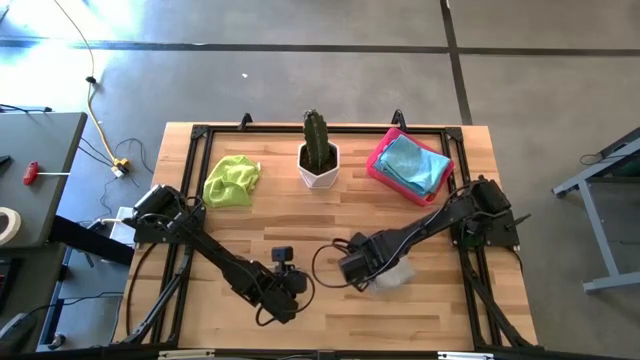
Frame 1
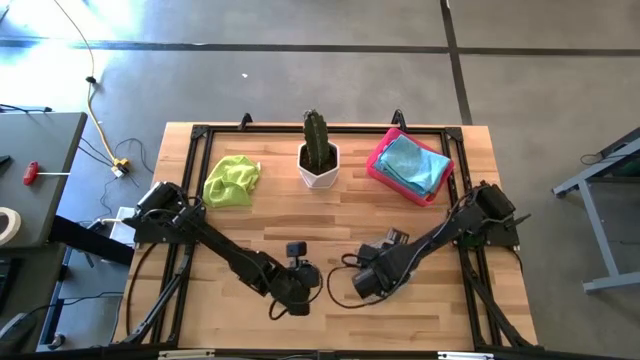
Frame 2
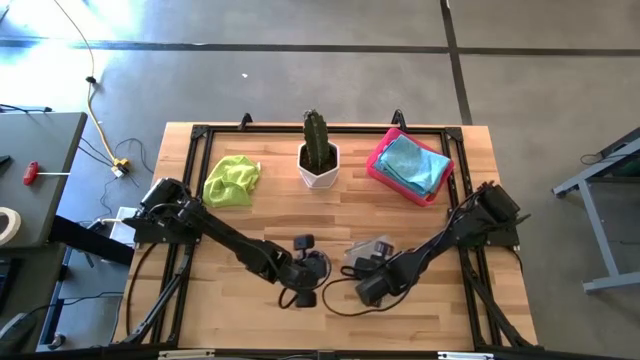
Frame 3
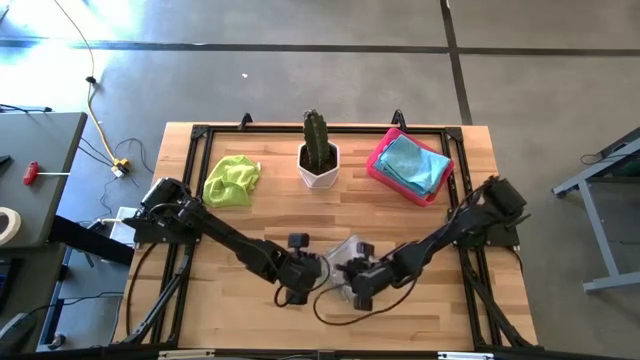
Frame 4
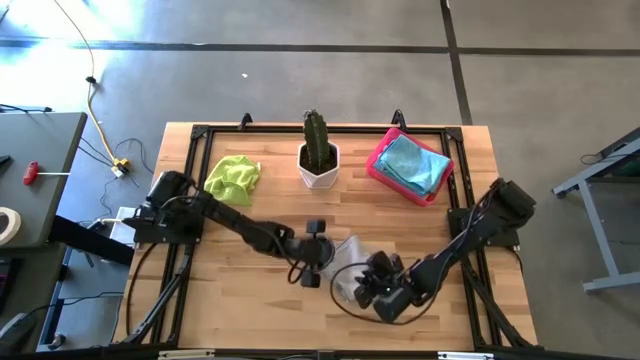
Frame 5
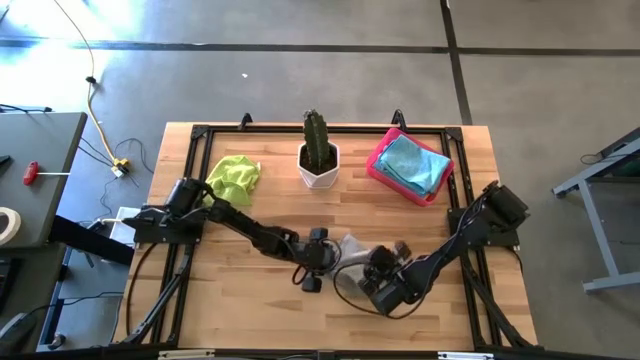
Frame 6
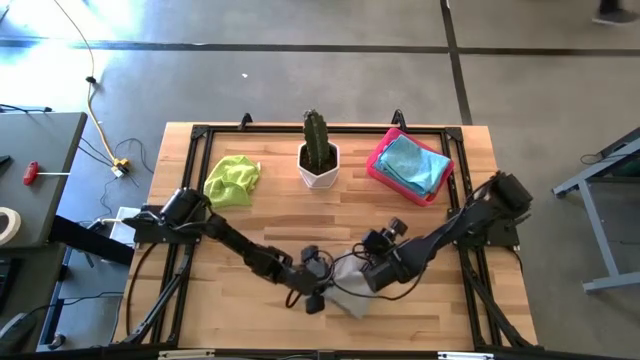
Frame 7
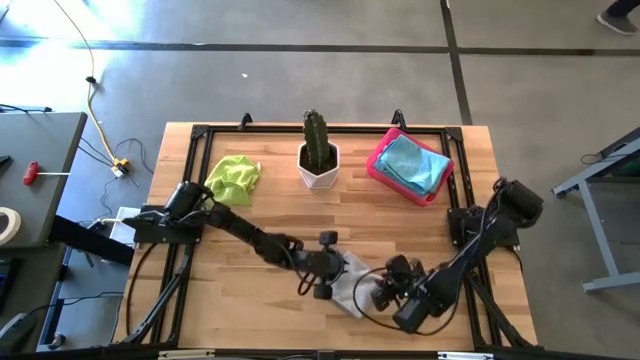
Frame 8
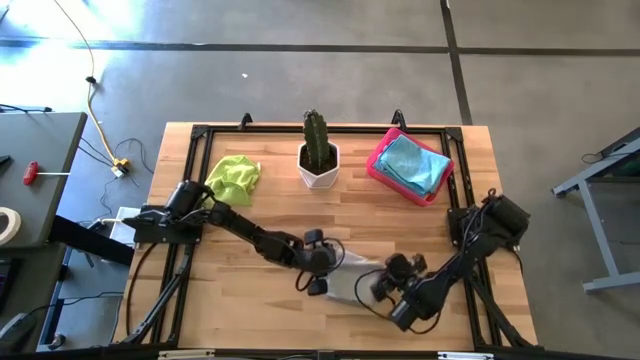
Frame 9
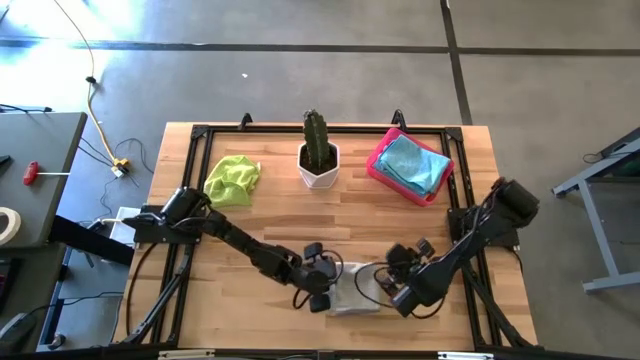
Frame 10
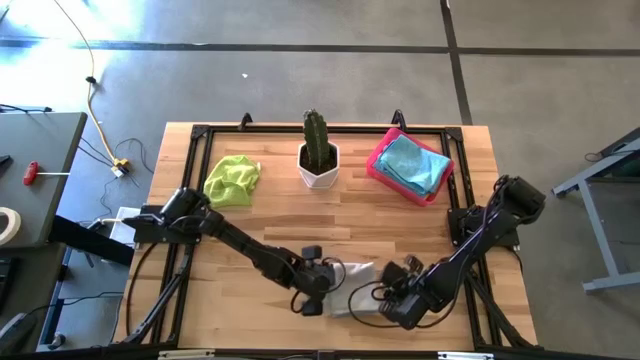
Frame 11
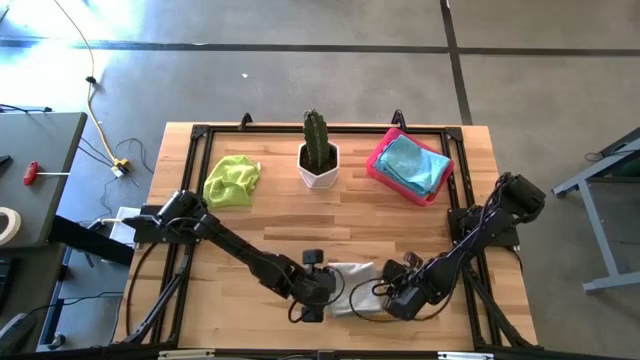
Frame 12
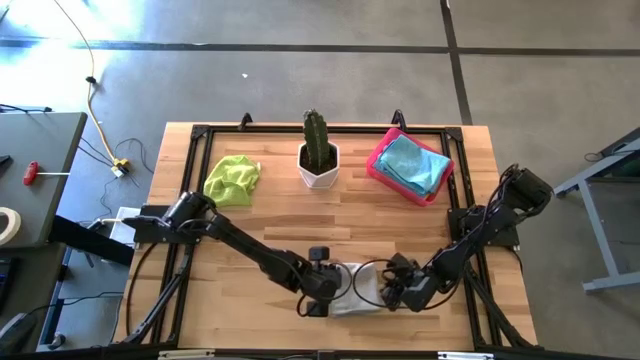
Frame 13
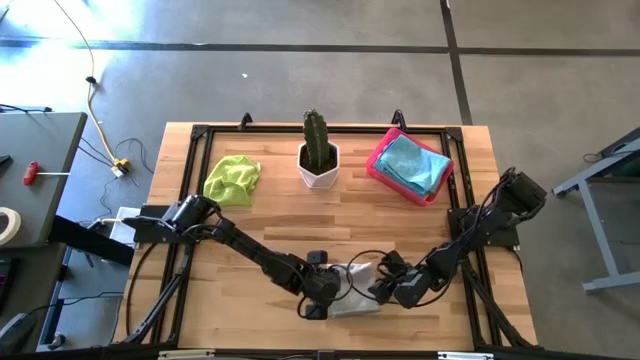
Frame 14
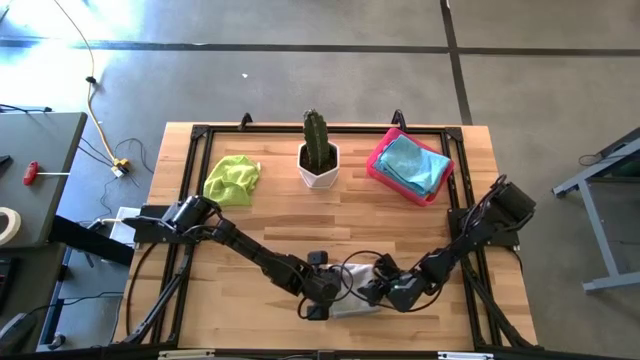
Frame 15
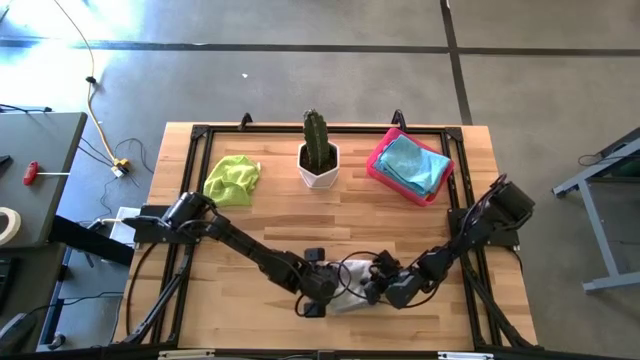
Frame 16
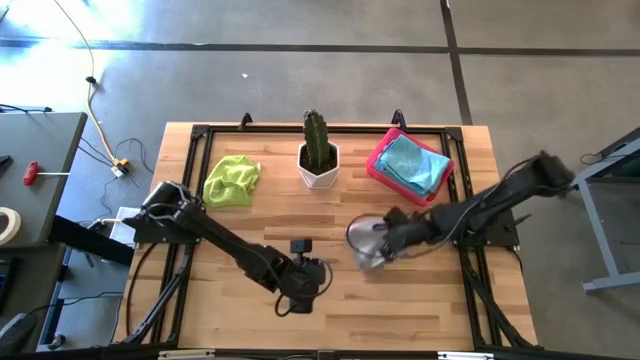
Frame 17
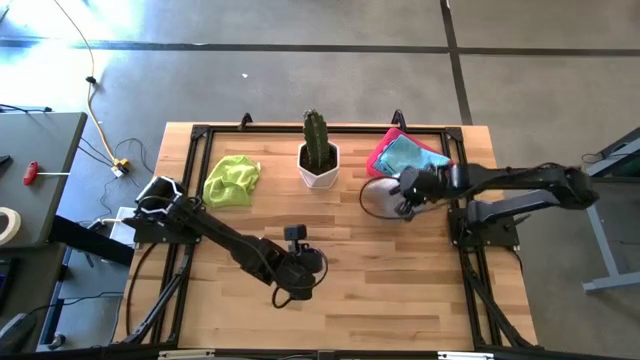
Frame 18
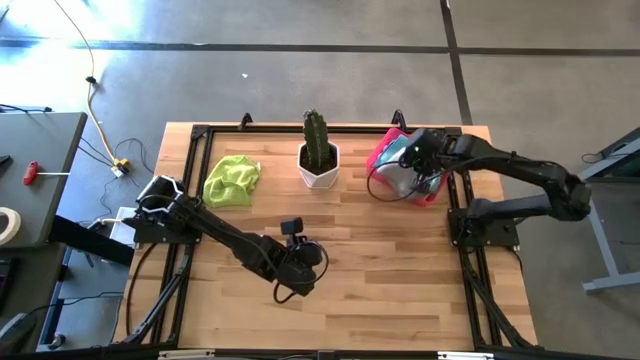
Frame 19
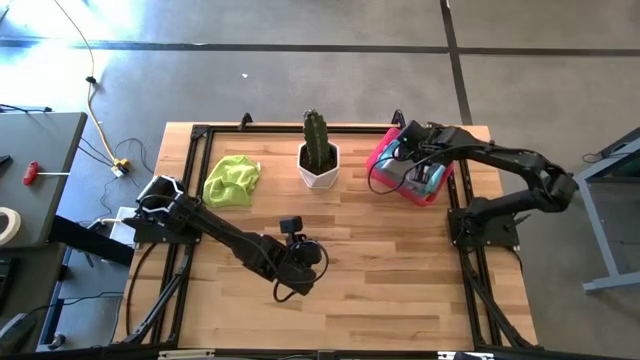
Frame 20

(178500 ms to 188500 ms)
Task: Fold microfiber towels
Put the gray microfiber towel into the red bin

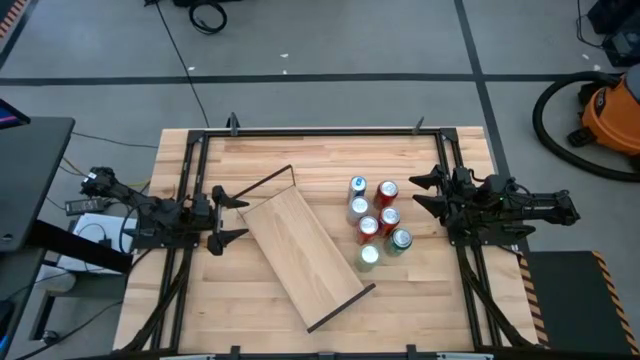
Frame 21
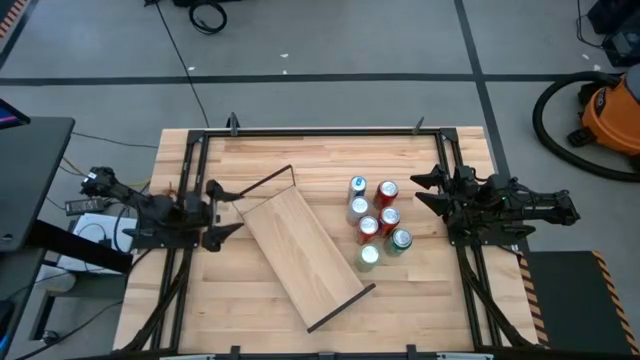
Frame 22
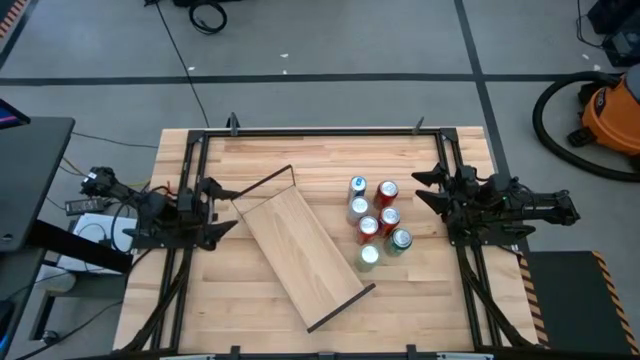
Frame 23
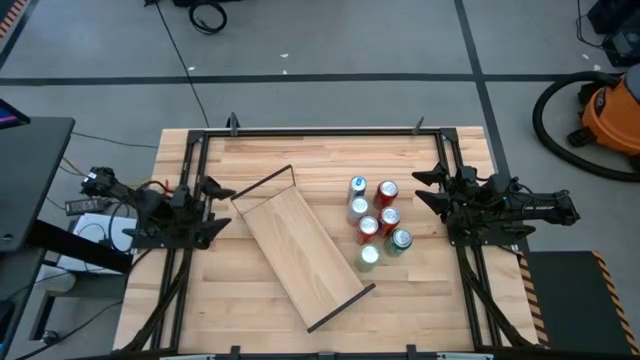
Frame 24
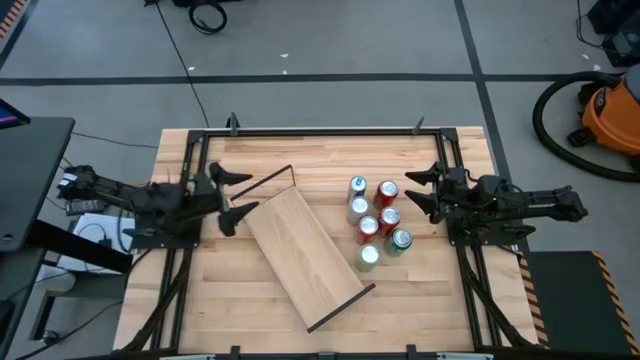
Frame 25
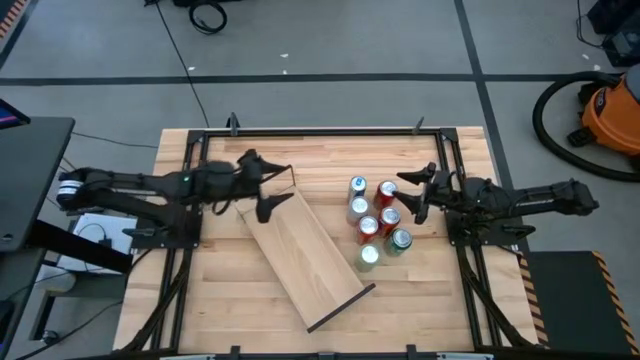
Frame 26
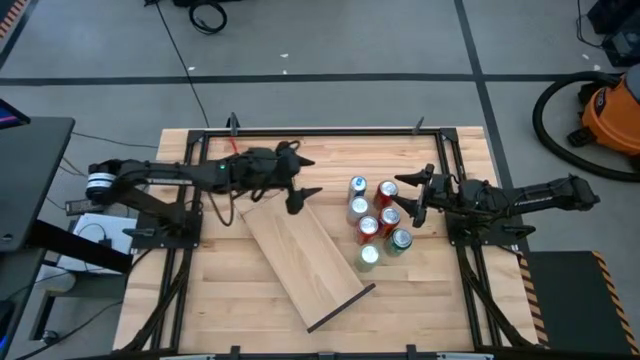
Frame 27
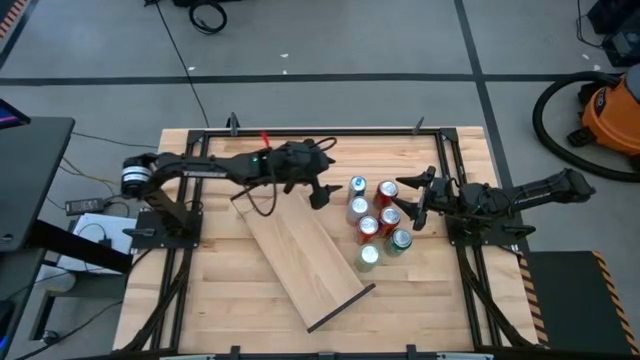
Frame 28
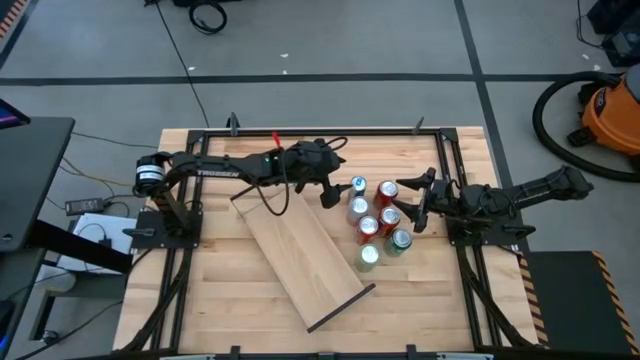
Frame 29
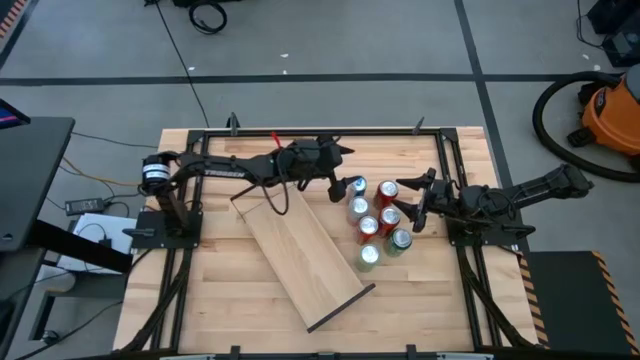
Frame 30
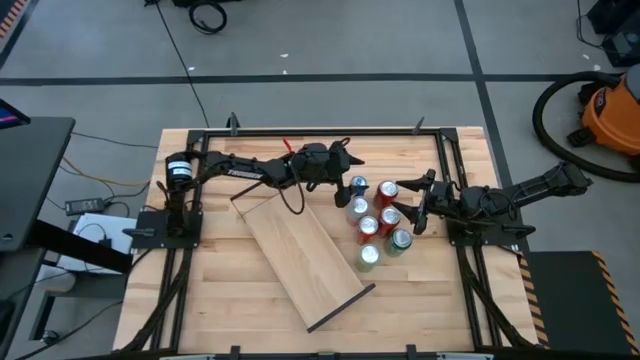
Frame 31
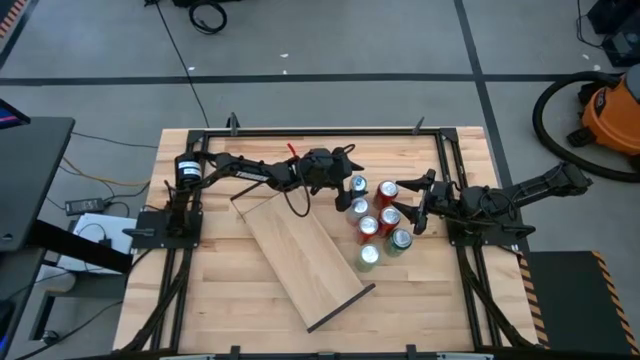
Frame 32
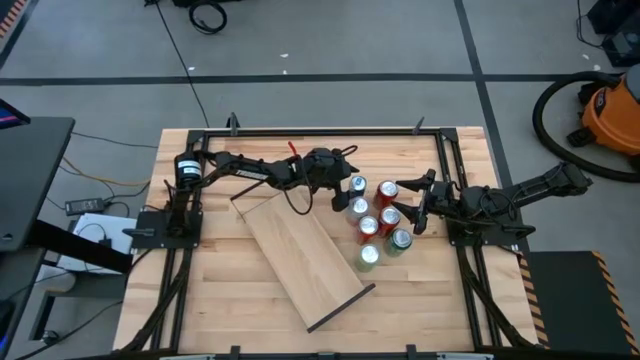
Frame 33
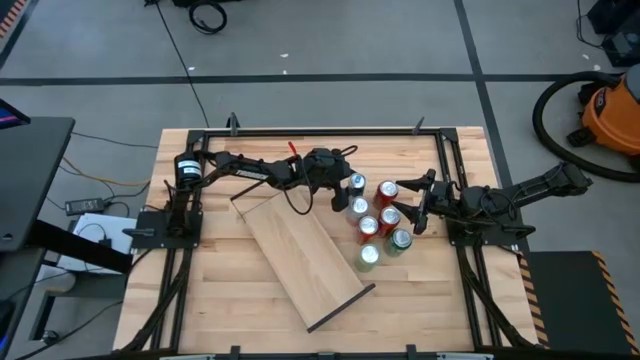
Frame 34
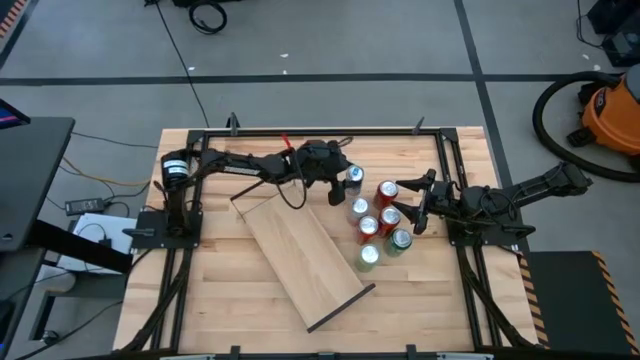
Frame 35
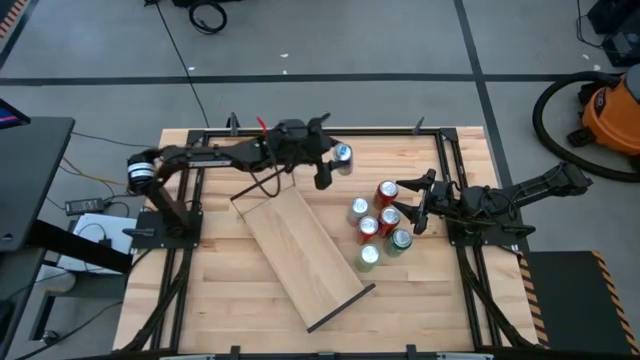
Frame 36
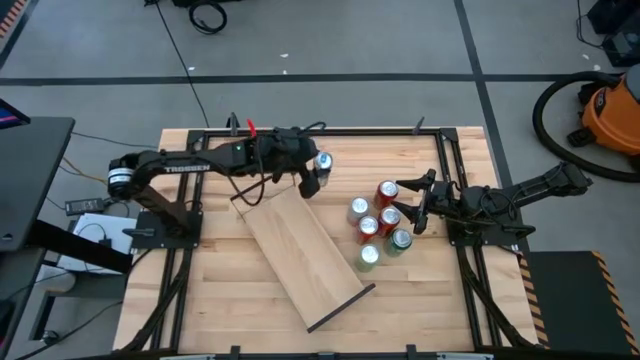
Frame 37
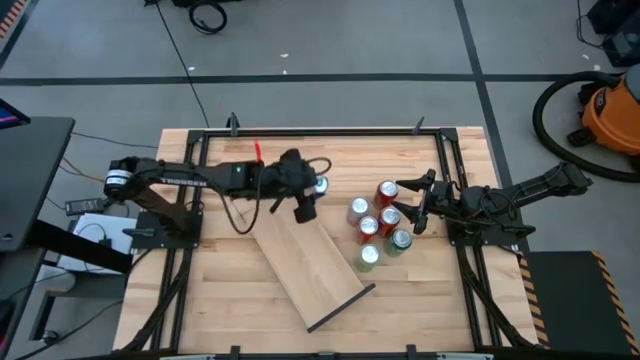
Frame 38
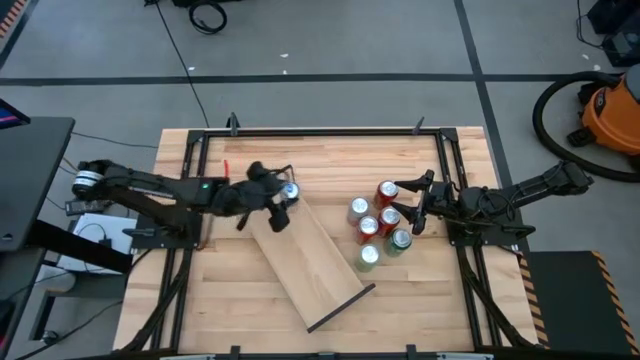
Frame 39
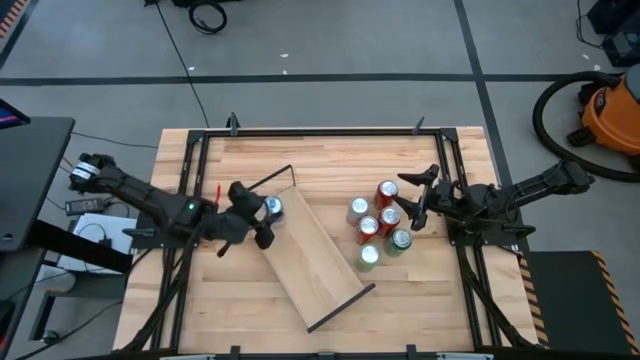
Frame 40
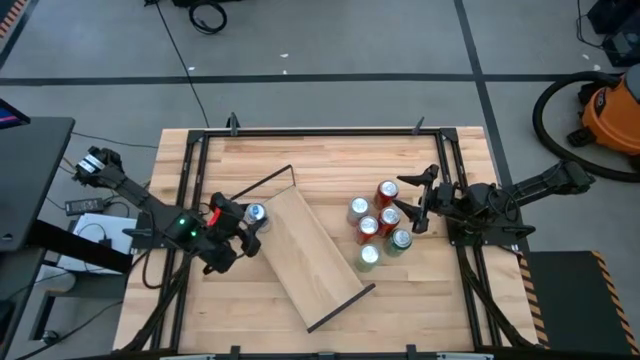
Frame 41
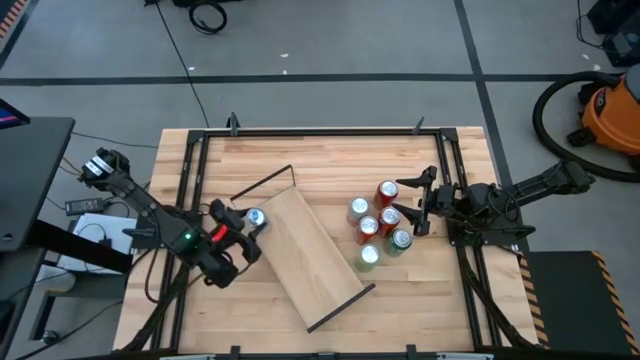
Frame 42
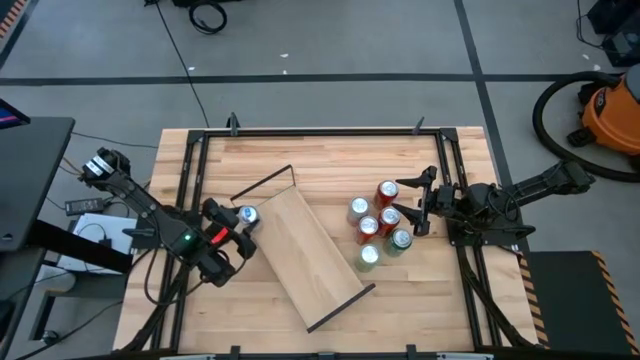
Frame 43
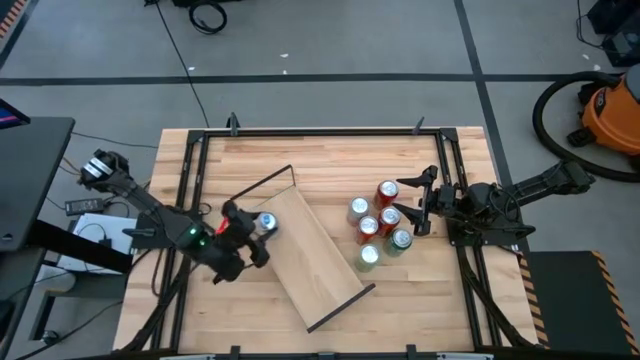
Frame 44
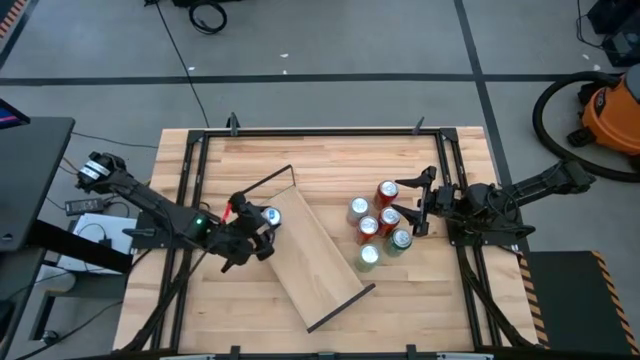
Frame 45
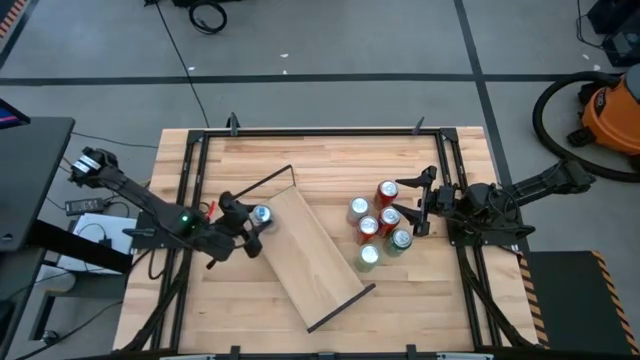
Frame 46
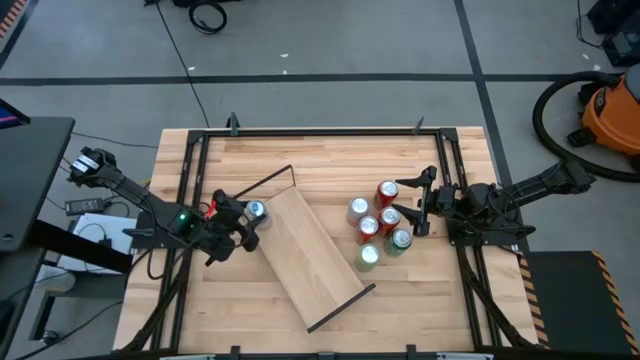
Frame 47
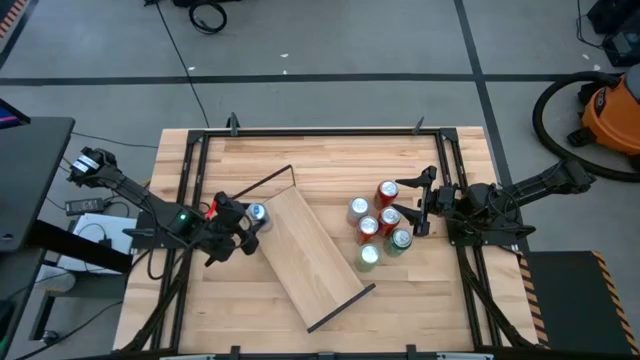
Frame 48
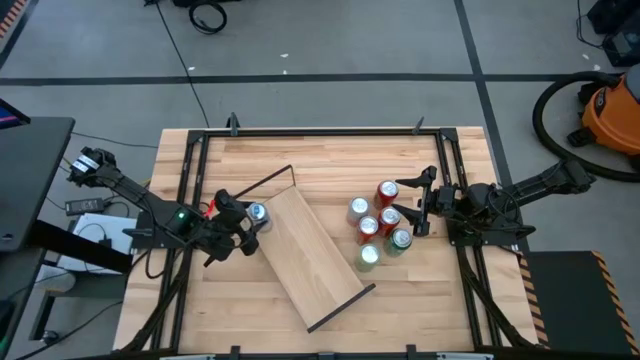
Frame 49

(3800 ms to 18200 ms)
Task: Place canned beverage on shelf
Put the blue soda can on the shelf
